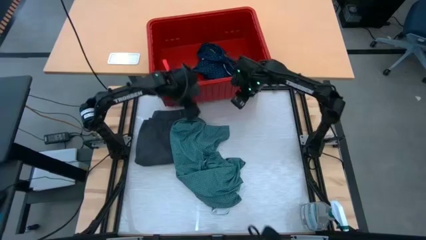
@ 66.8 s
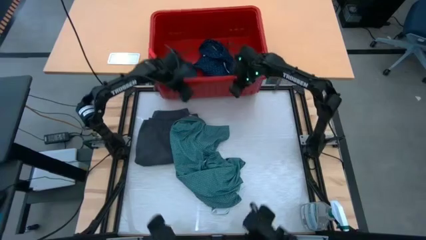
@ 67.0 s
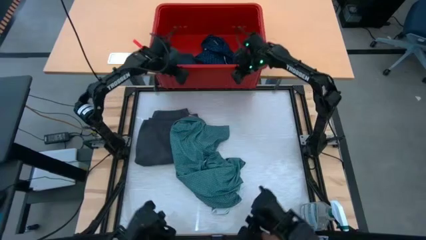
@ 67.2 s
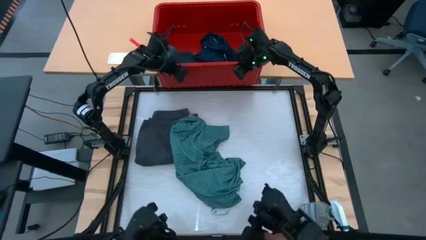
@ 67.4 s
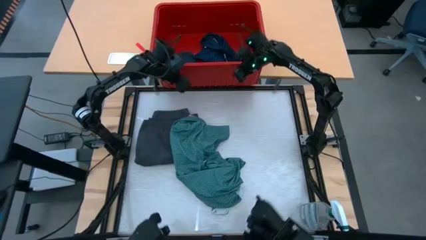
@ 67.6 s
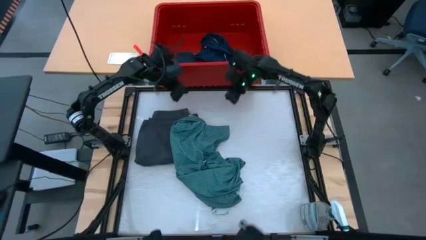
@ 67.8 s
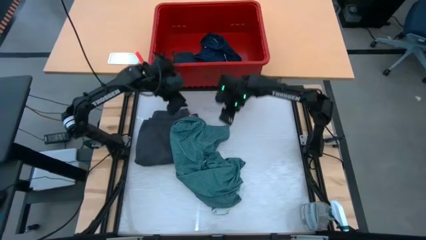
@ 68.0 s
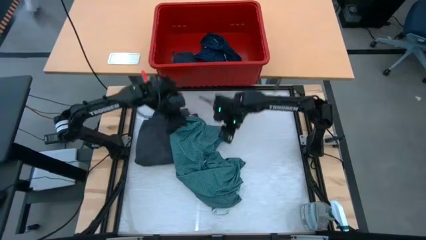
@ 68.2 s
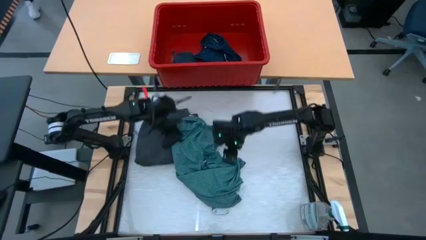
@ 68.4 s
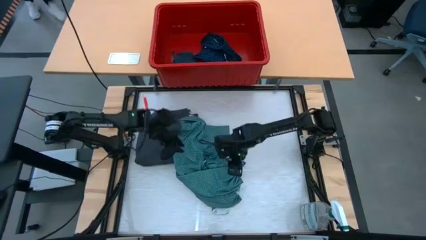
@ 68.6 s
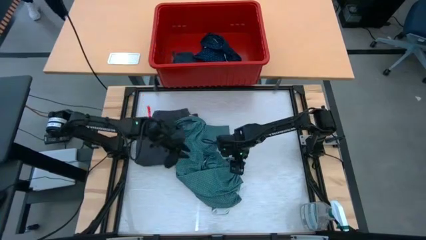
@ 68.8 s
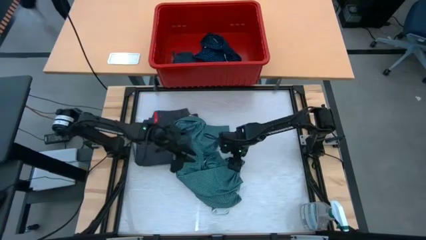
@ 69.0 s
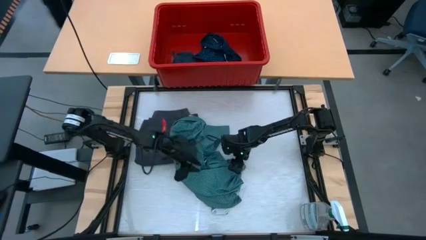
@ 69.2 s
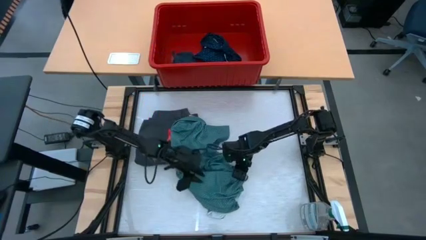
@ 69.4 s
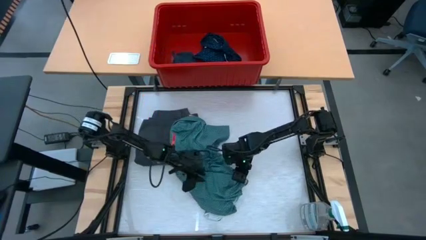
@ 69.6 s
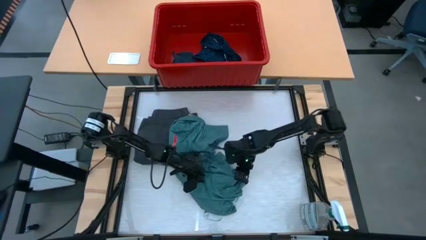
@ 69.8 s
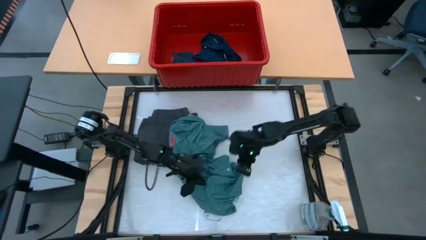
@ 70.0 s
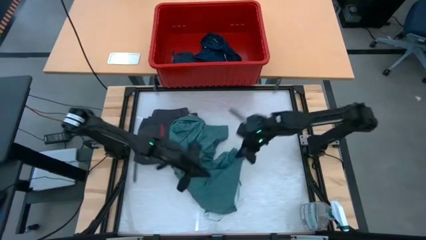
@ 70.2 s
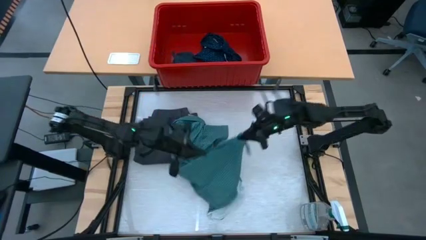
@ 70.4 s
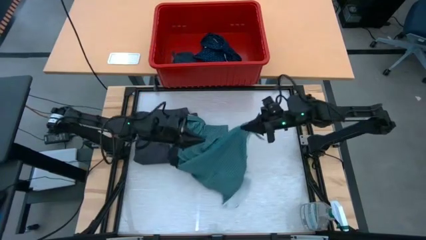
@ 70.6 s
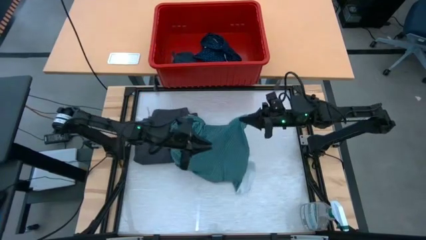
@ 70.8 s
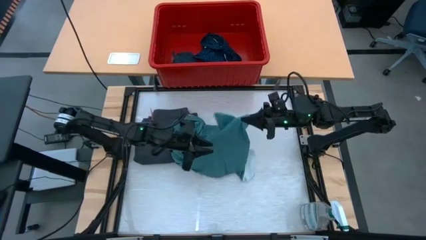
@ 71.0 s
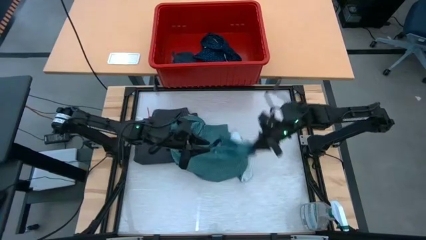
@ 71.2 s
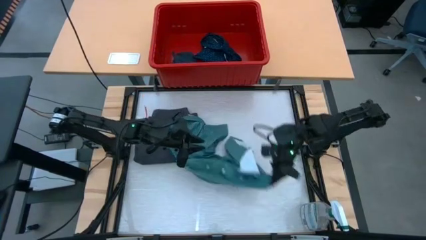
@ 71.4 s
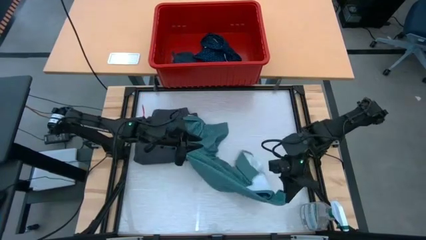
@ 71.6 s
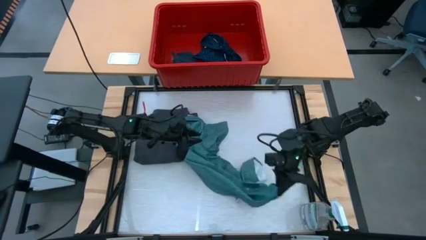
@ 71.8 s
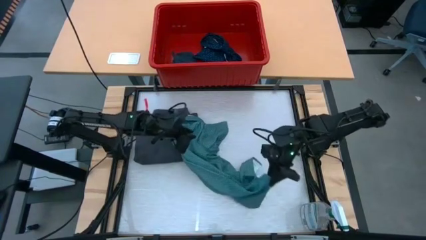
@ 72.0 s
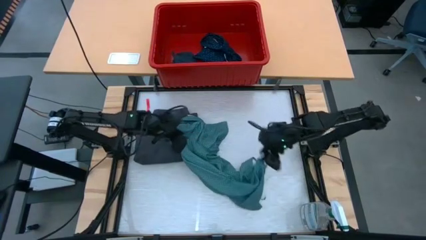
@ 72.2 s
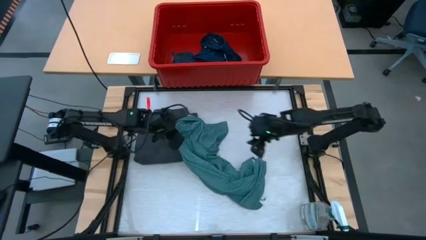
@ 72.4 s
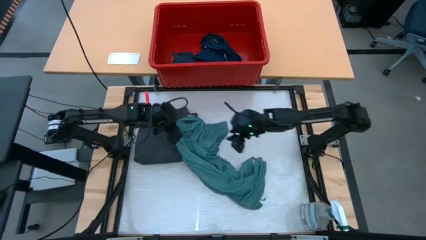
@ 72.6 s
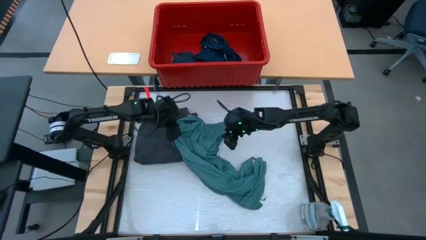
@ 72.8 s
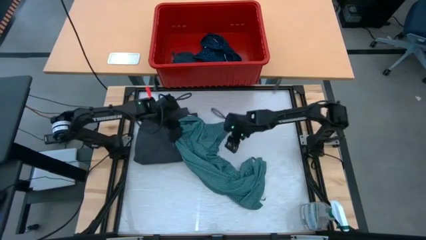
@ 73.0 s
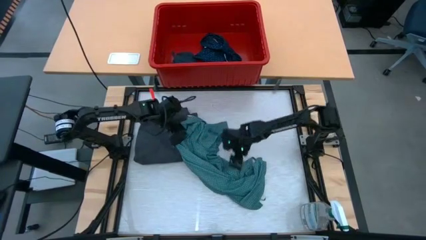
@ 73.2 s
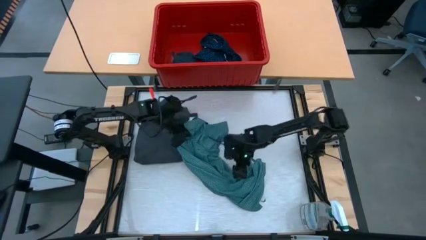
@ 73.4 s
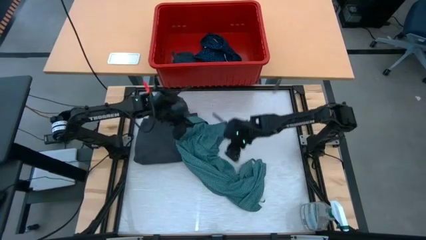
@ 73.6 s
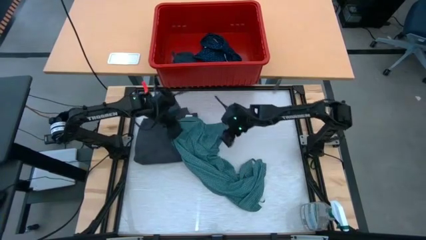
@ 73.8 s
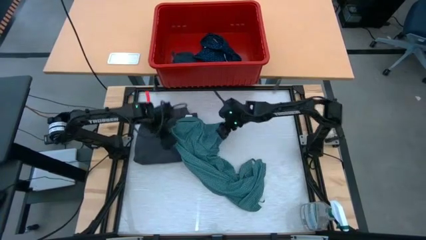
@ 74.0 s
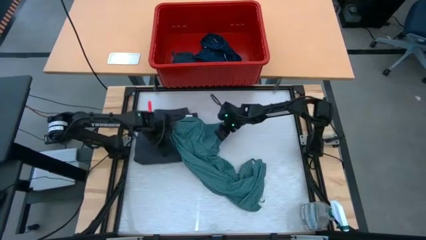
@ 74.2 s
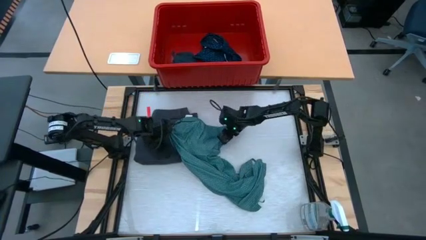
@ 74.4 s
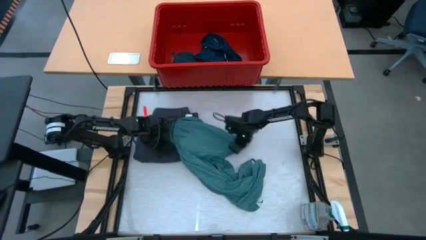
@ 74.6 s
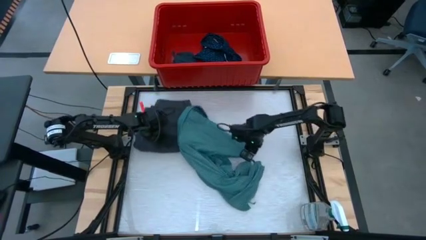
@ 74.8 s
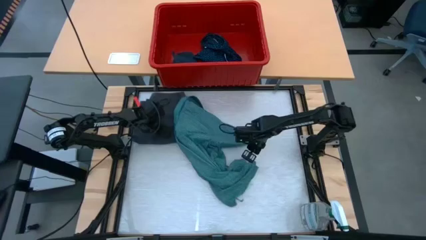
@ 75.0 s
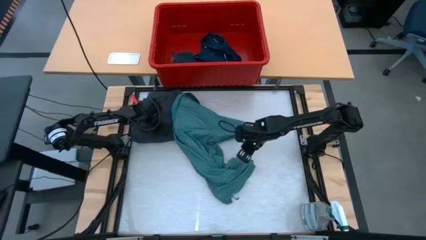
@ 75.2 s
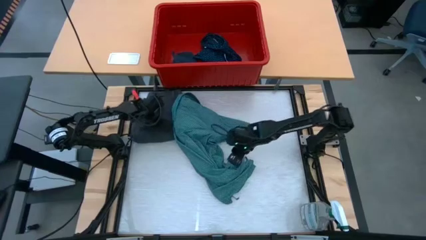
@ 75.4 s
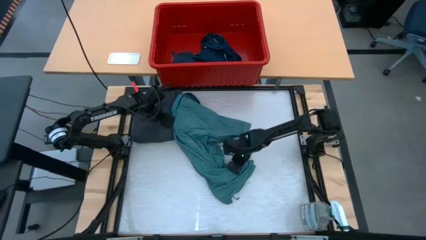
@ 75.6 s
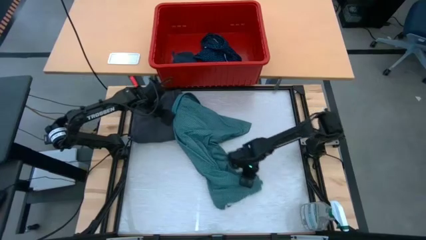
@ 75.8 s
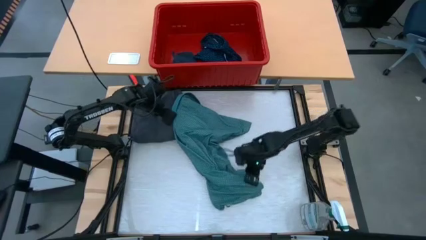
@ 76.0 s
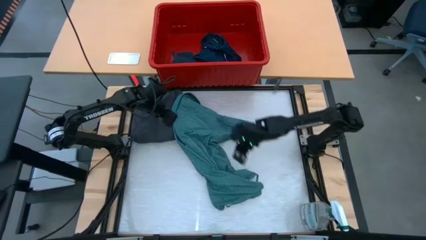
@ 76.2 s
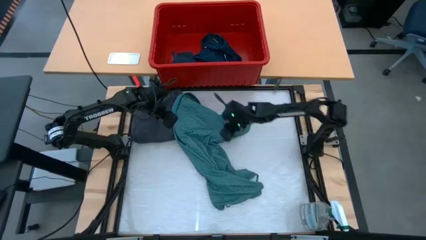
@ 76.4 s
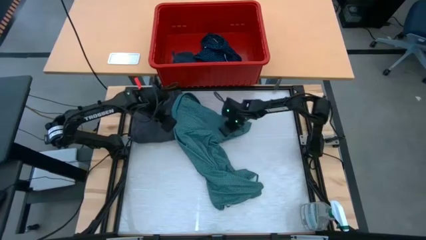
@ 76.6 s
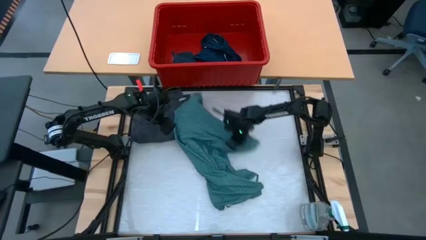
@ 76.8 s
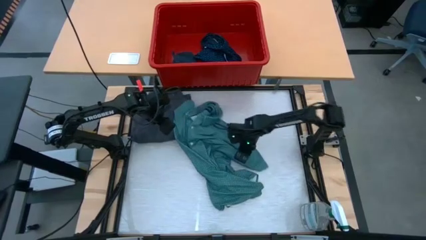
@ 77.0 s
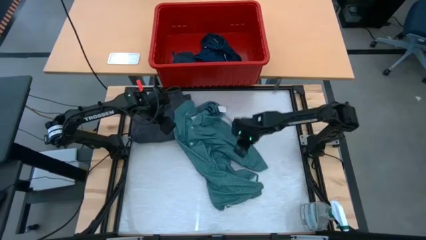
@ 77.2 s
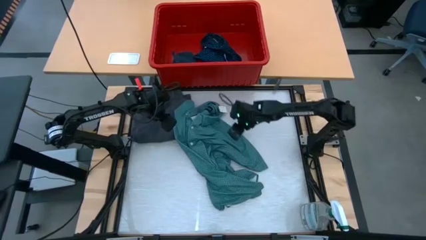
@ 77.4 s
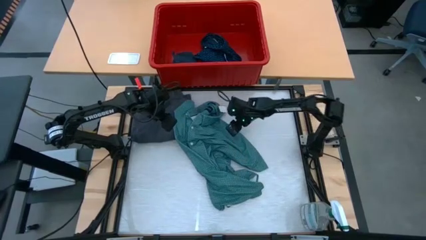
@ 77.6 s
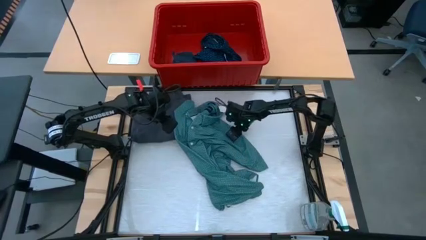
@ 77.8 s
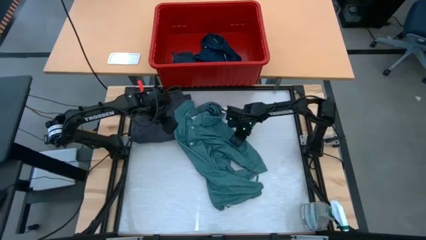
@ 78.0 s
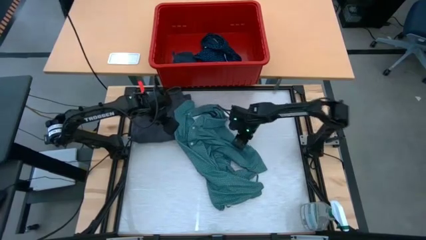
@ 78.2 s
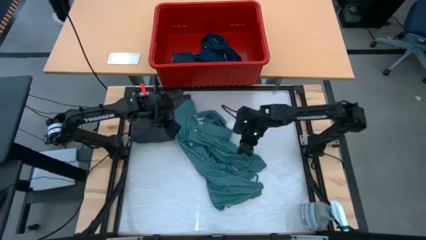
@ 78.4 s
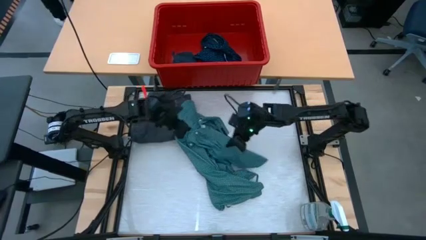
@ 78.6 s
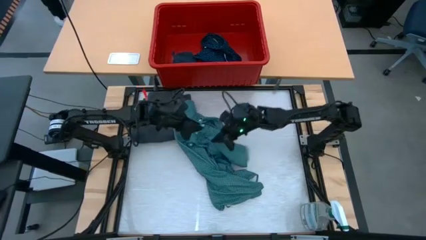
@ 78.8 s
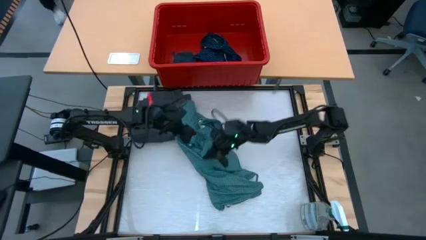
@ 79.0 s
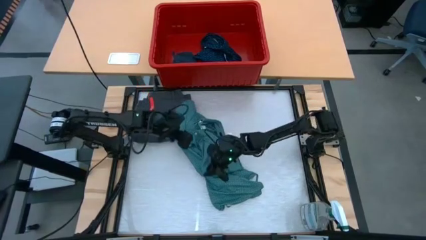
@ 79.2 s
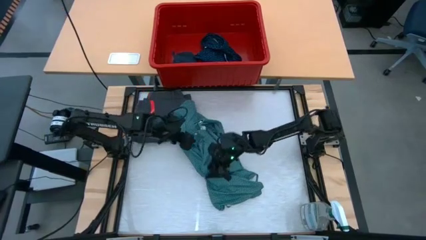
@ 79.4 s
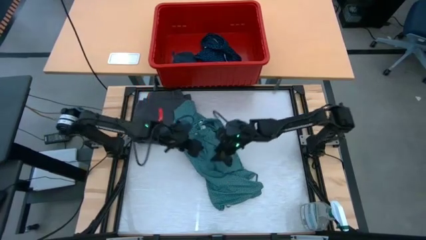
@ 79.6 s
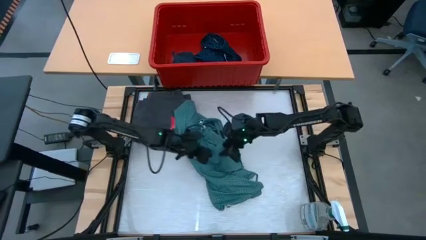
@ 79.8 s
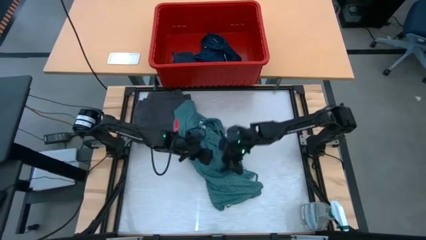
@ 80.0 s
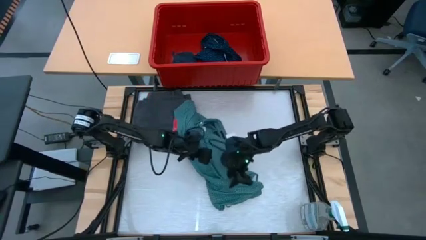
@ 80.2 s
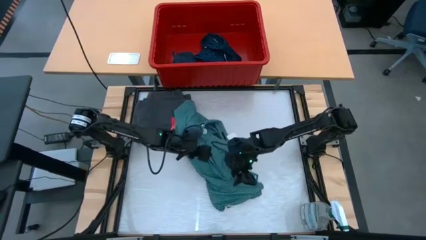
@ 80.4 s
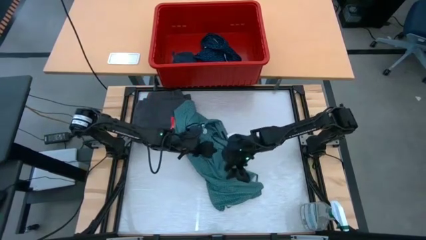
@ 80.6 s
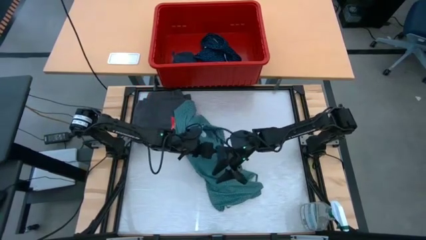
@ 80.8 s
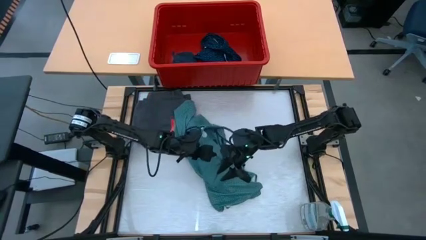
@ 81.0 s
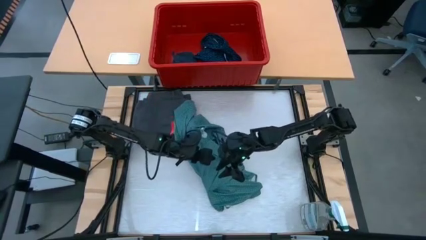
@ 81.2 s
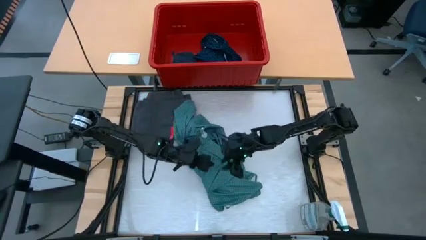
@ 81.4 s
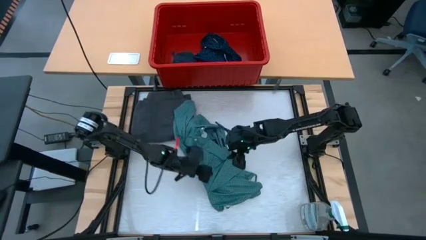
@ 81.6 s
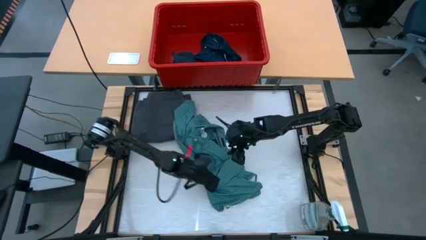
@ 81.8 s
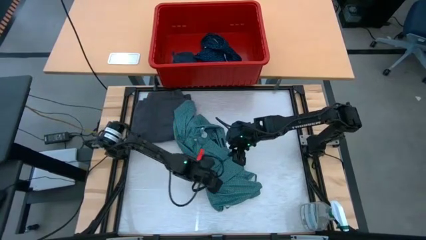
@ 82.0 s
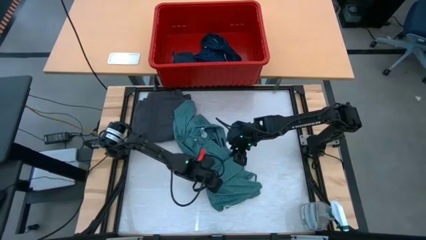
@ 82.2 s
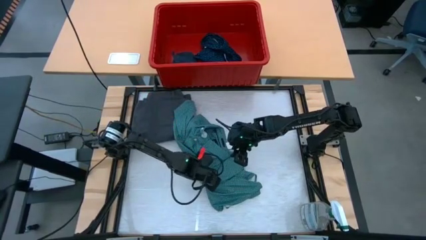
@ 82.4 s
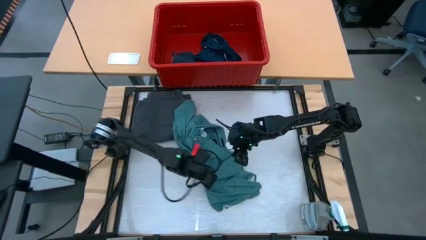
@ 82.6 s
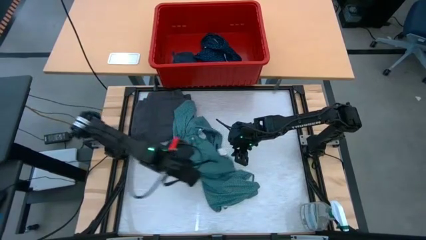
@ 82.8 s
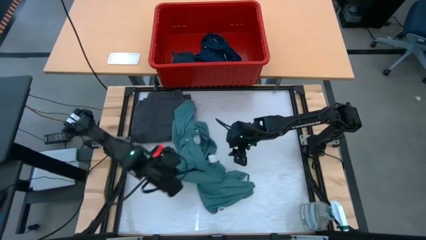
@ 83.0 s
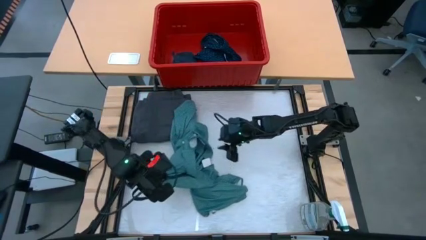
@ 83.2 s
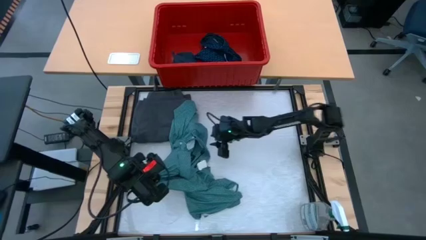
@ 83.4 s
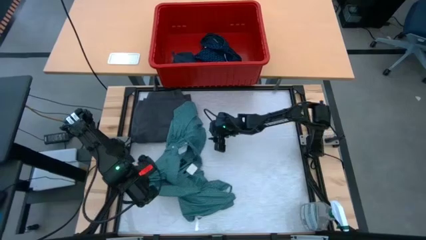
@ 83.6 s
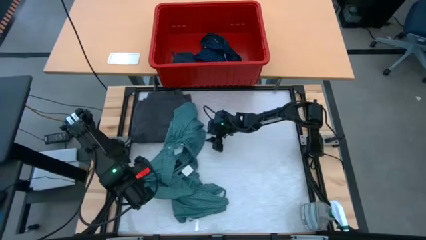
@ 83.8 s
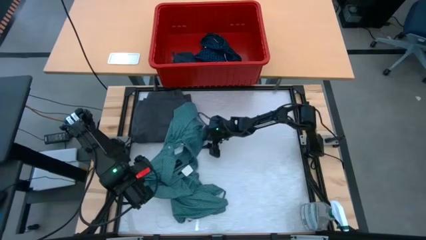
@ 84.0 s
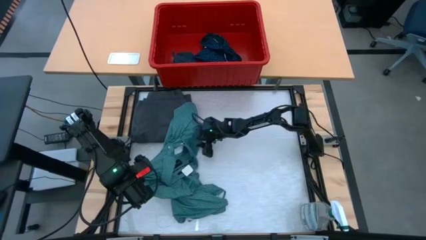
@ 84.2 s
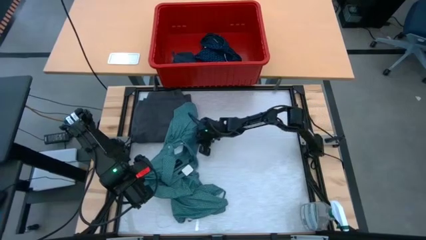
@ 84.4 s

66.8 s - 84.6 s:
Task: Fold laundry
Fold the dark green polo
